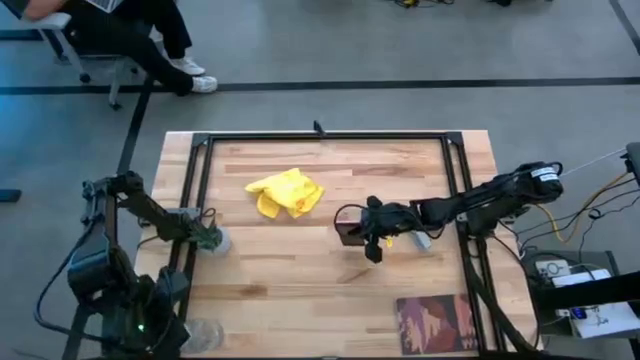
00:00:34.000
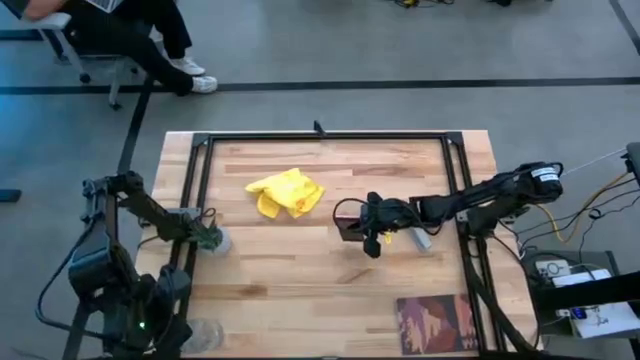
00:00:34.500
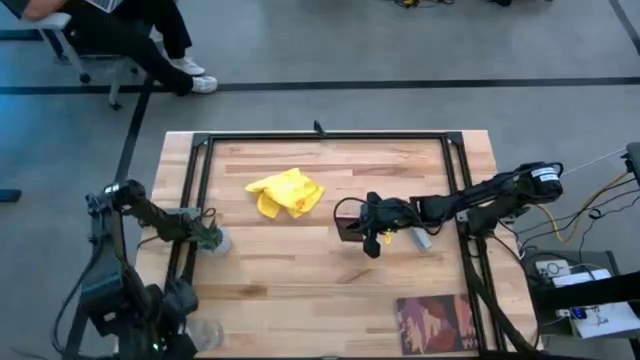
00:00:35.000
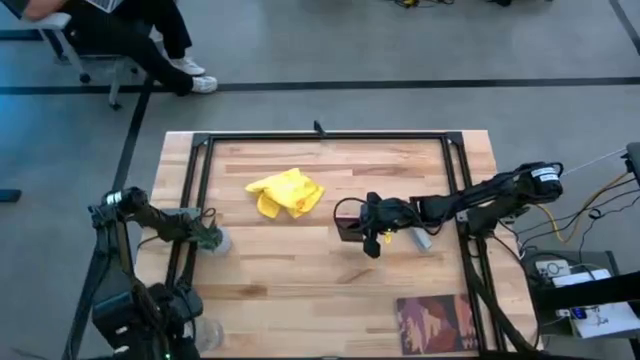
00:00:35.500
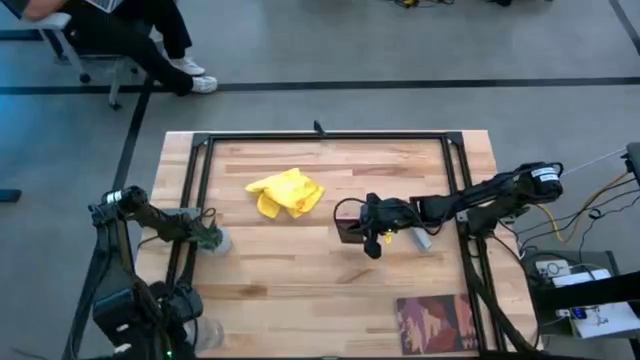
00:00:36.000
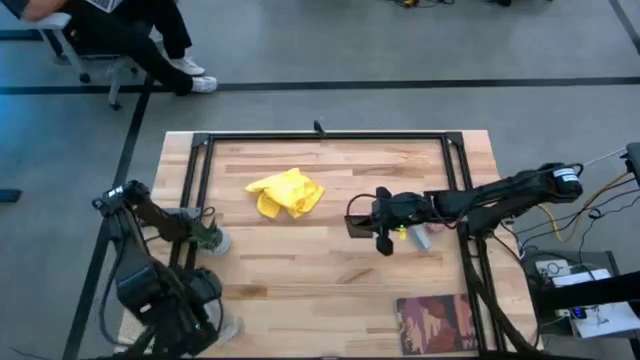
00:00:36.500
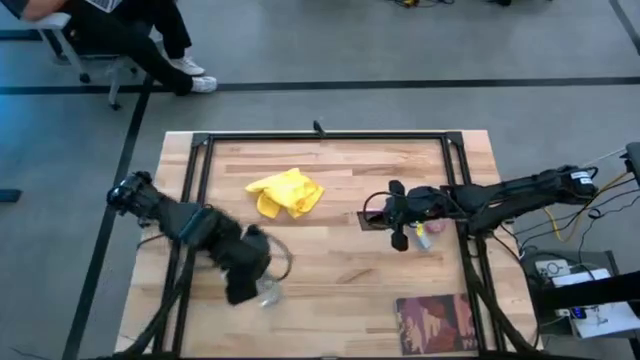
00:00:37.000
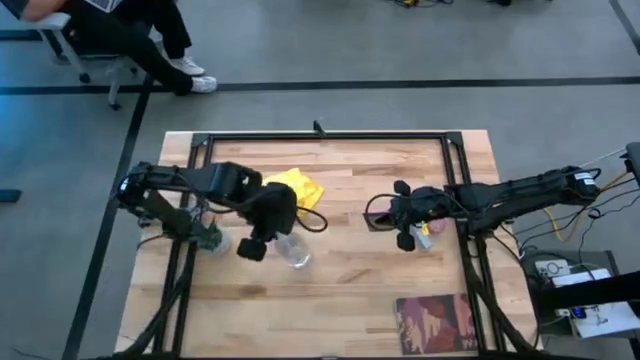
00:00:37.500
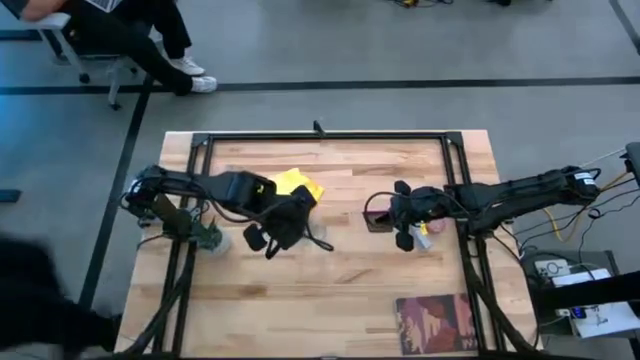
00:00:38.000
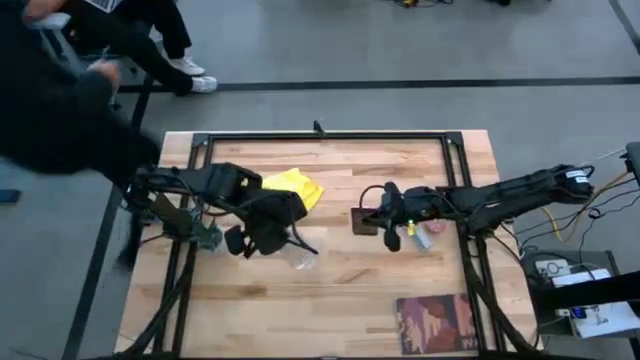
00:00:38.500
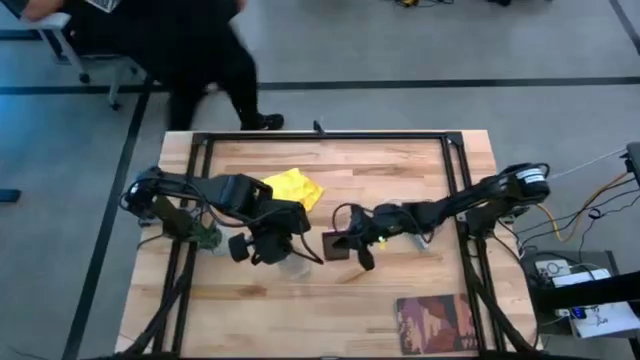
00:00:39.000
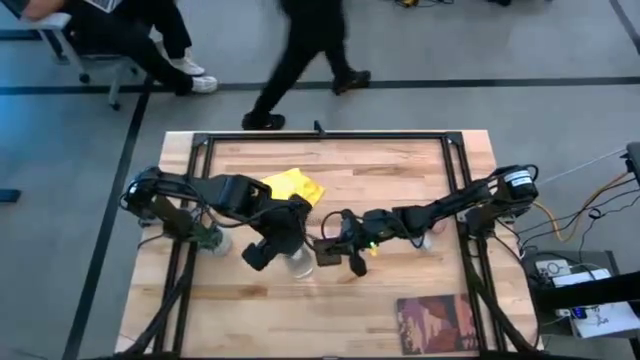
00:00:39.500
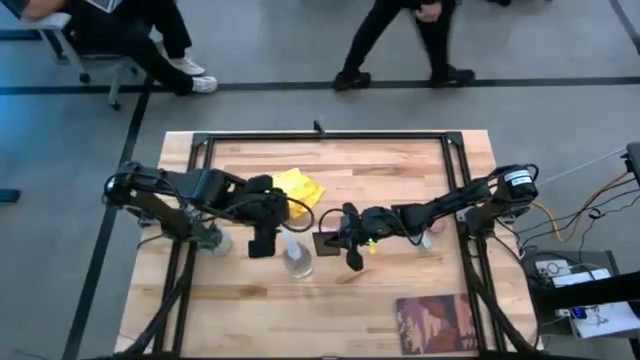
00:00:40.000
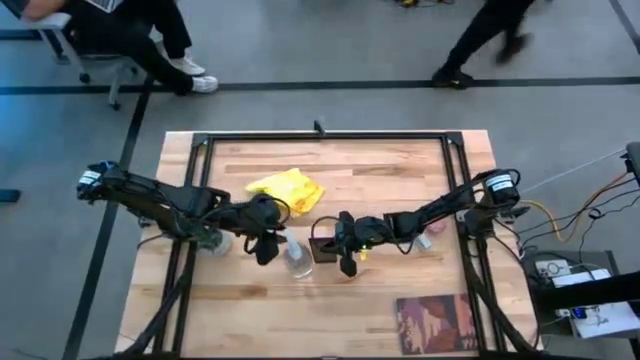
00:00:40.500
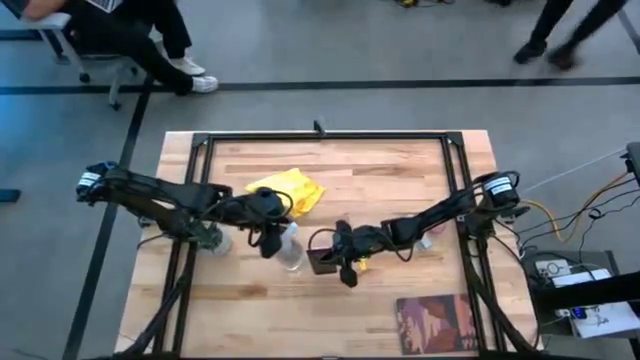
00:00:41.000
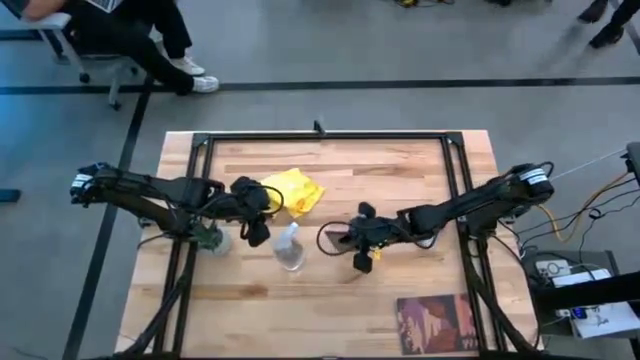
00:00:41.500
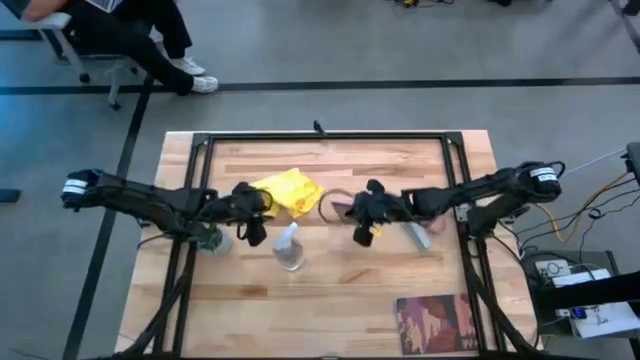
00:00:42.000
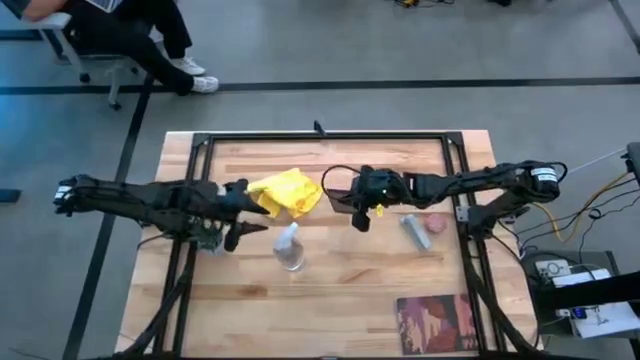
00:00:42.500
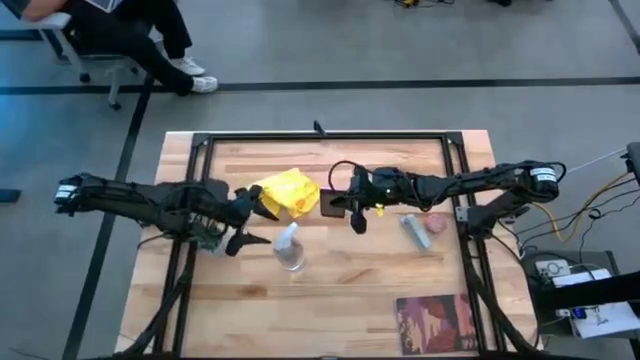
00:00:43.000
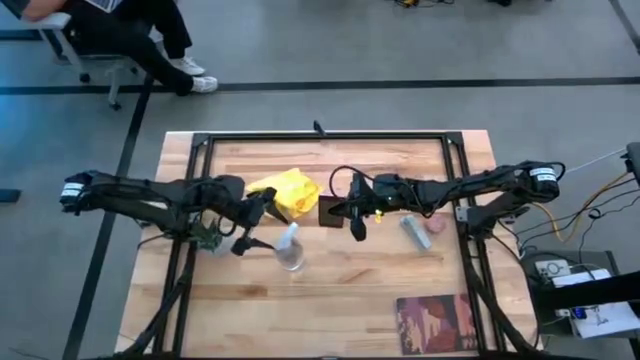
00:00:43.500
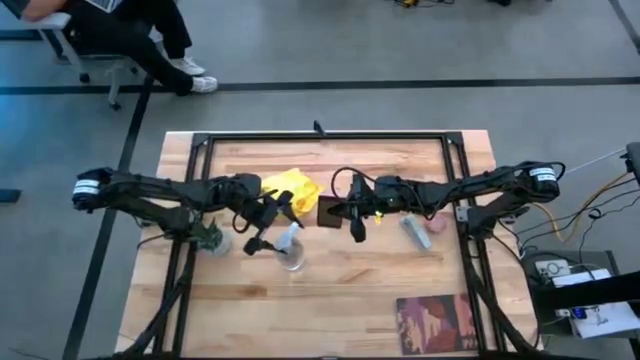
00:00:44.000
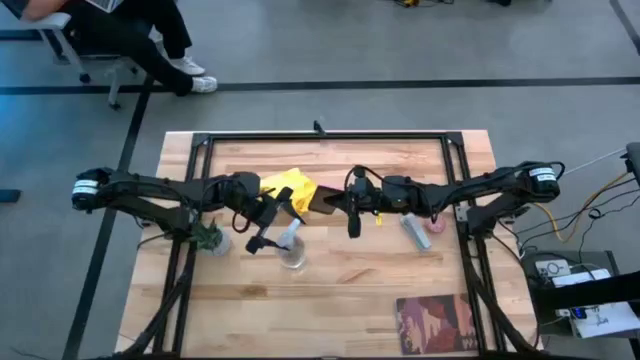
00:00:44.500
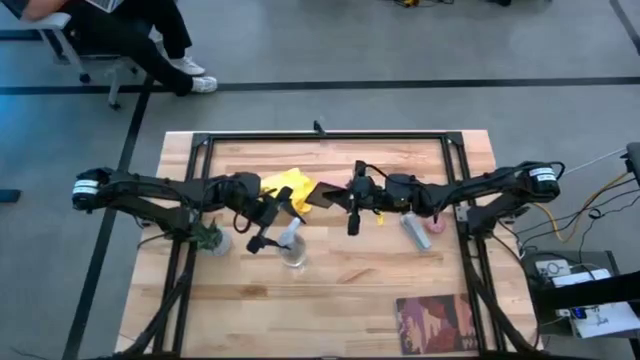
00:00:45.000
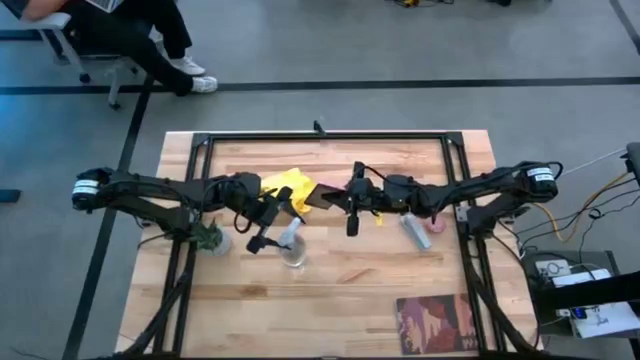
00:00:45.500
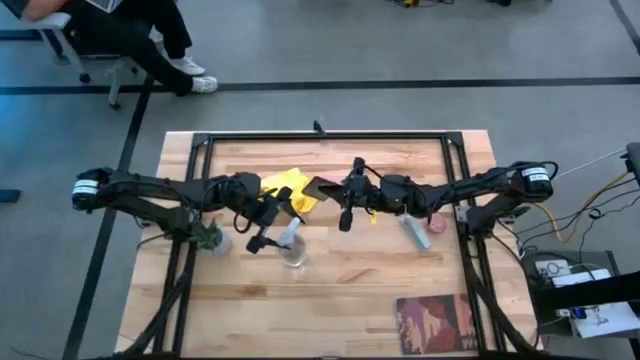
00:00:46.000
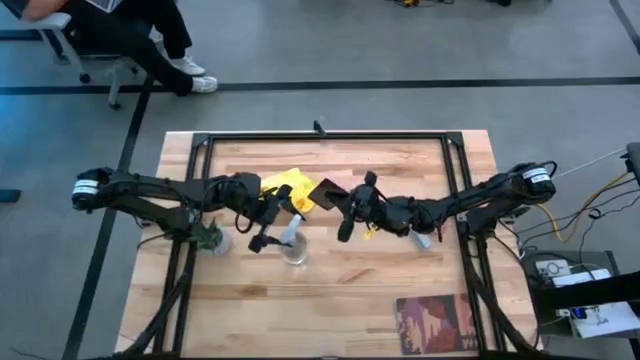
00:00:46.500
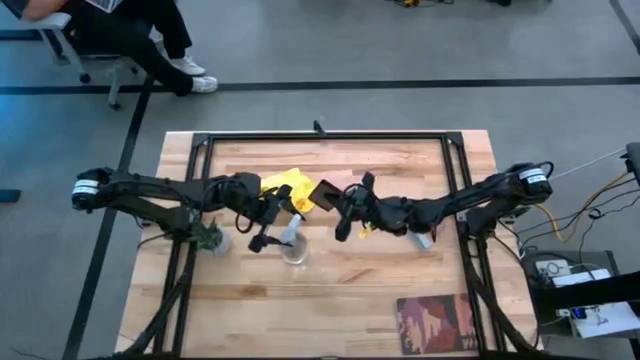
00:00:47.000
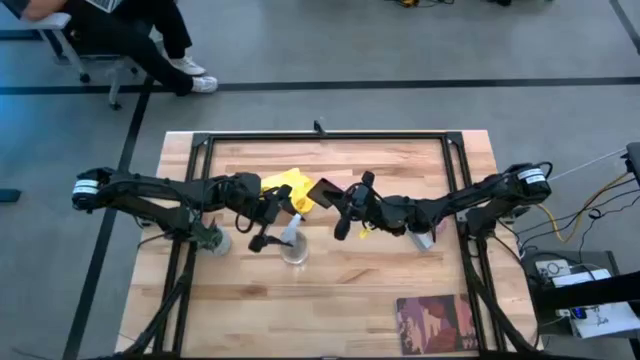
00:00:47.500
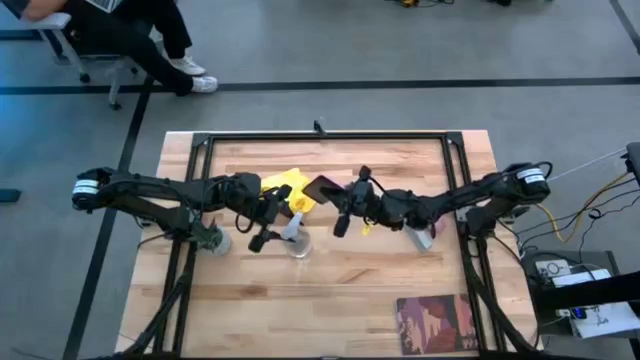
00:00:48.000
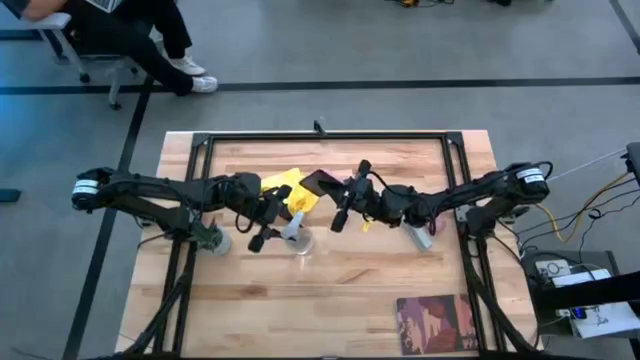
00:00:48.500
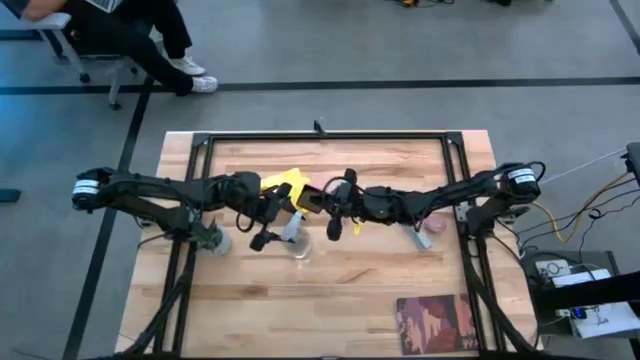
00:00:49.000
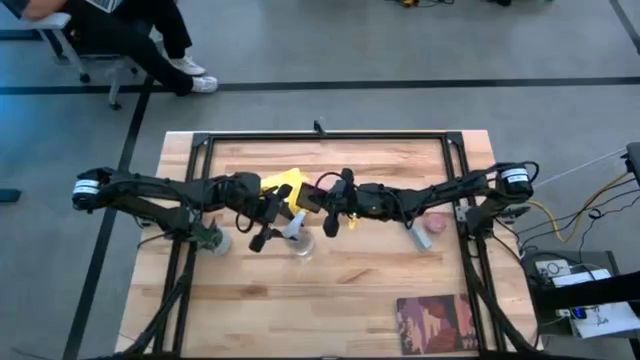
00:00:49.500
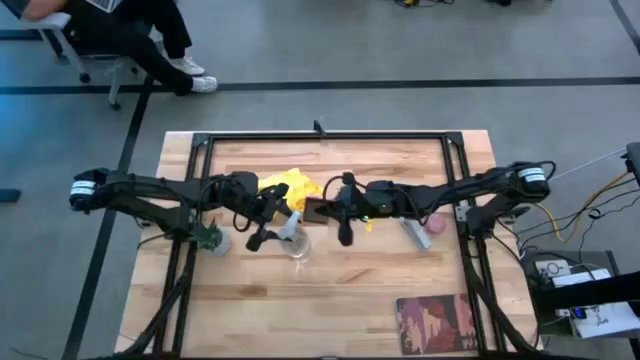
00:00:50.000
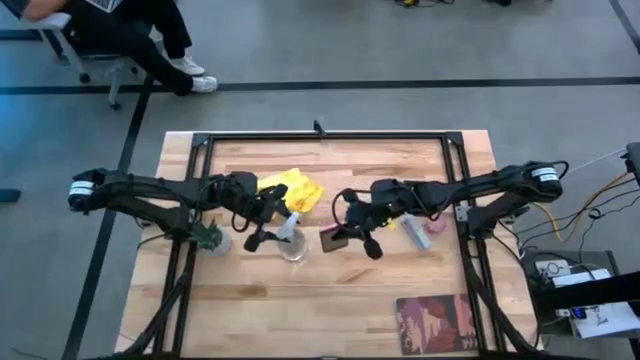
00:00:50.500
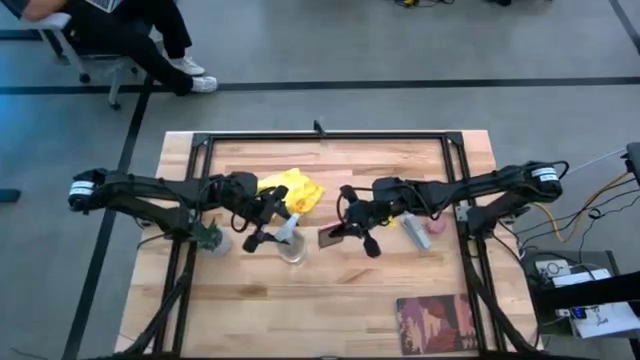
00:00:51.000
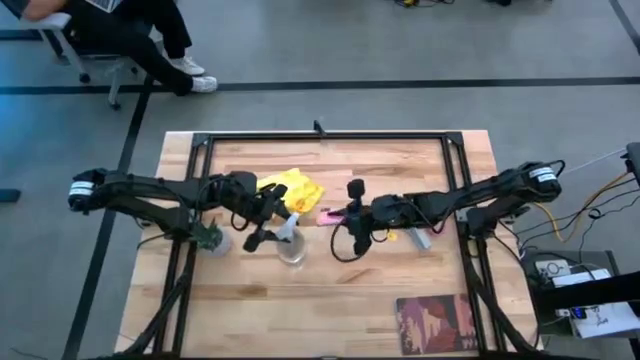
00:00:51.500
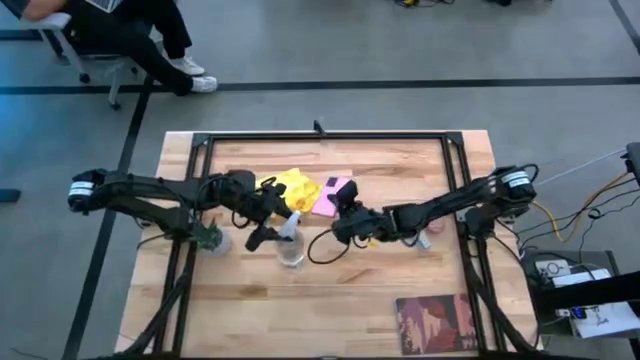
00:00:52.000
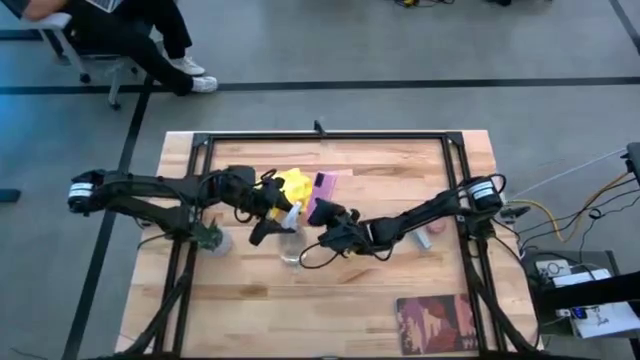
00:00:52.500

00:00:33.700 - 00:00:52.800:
Task: Apply microfiber cloth
Spray the front and back of the cellphone using the spray bottle
